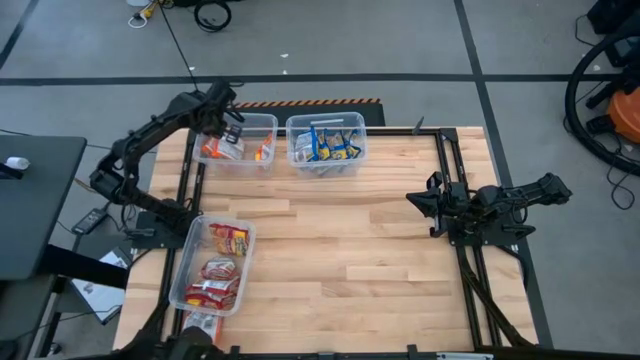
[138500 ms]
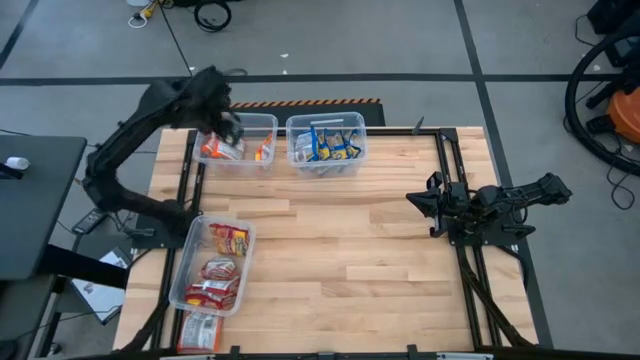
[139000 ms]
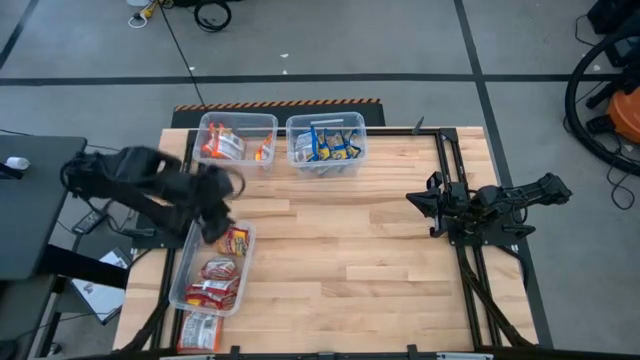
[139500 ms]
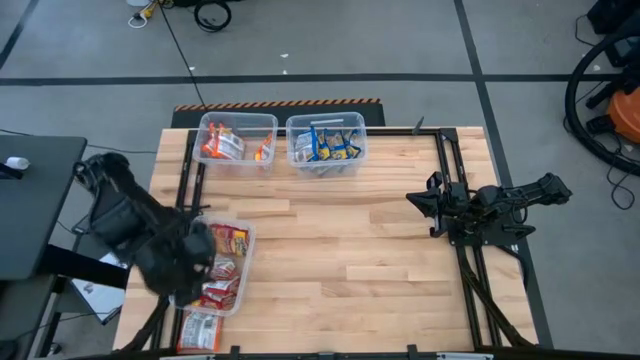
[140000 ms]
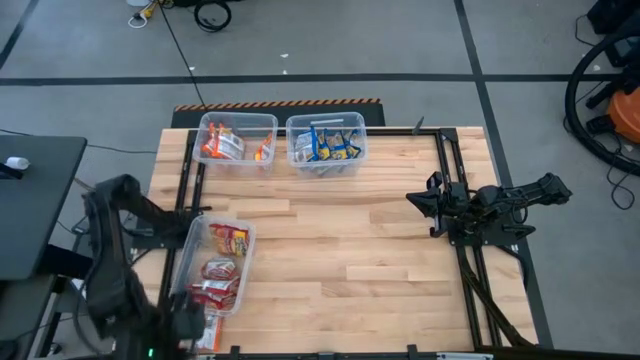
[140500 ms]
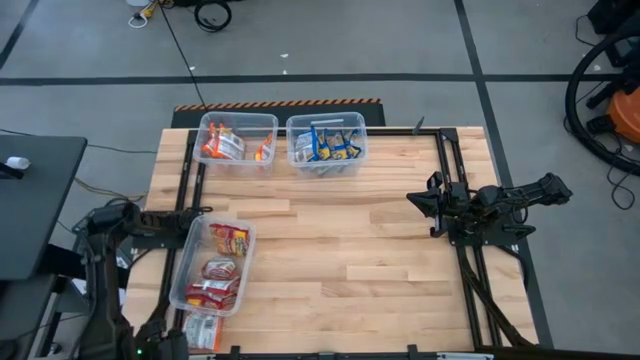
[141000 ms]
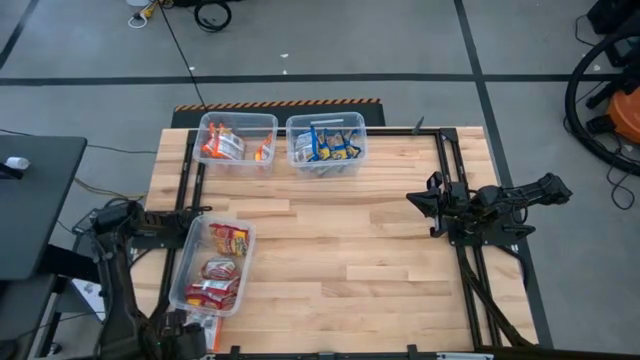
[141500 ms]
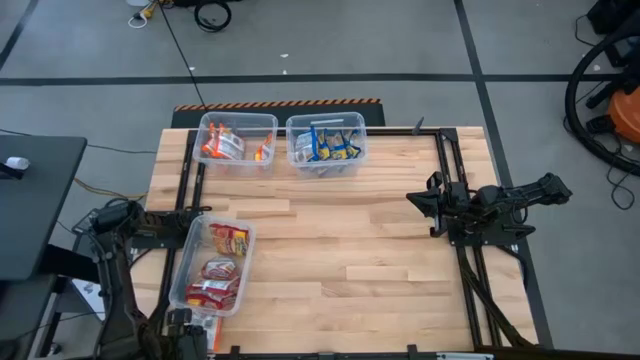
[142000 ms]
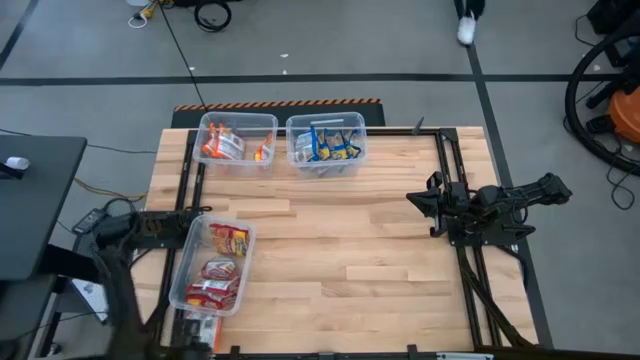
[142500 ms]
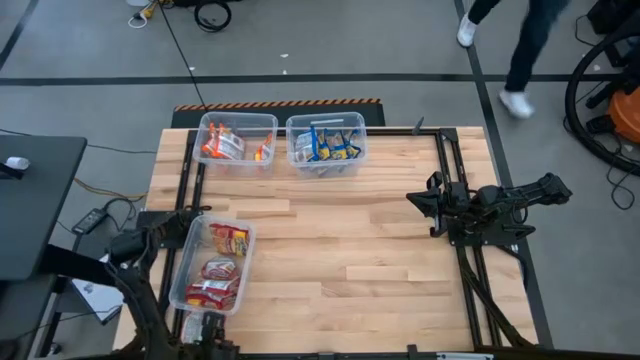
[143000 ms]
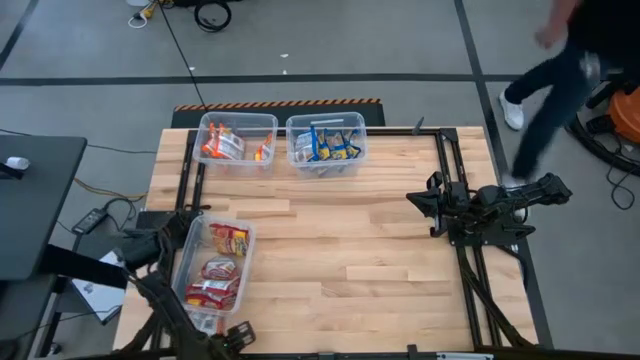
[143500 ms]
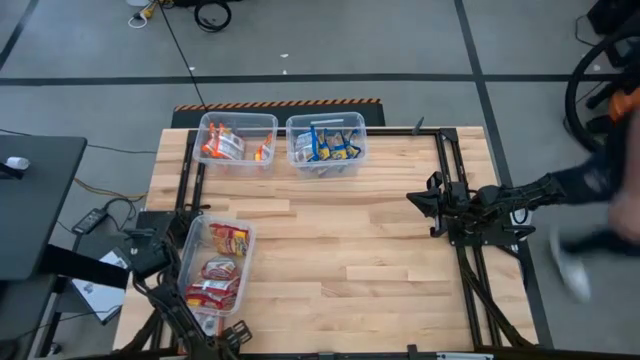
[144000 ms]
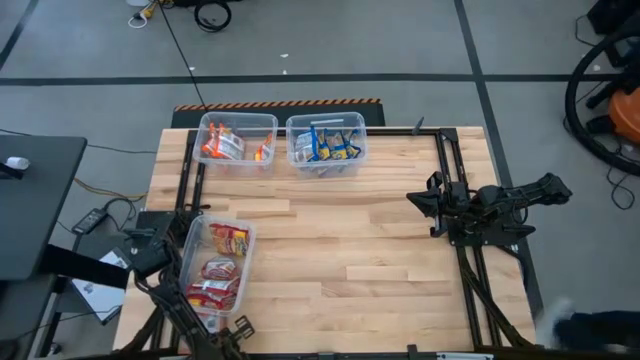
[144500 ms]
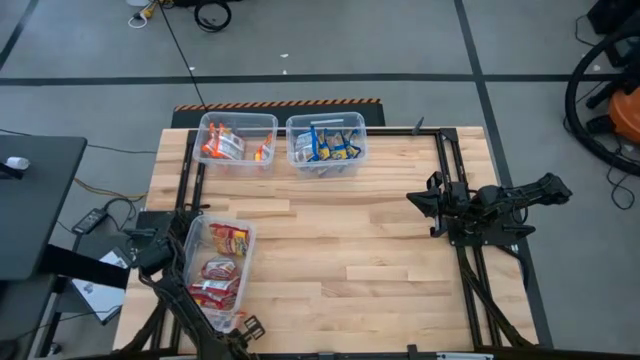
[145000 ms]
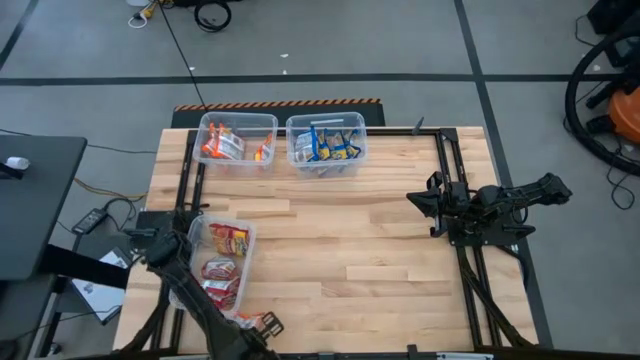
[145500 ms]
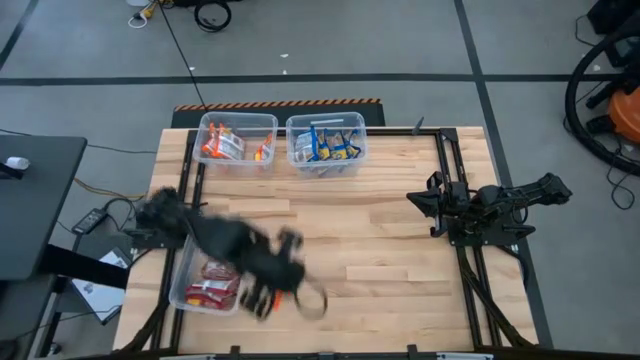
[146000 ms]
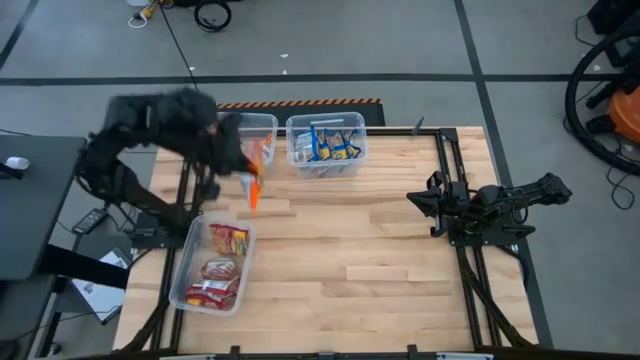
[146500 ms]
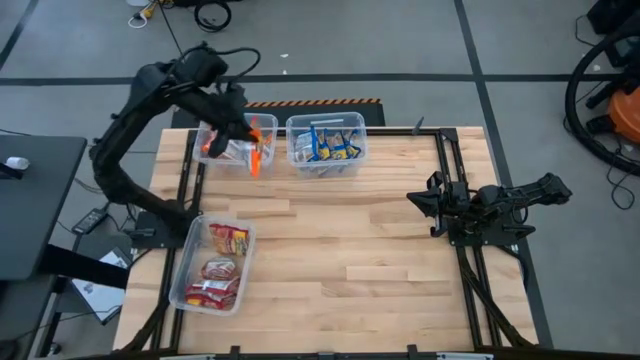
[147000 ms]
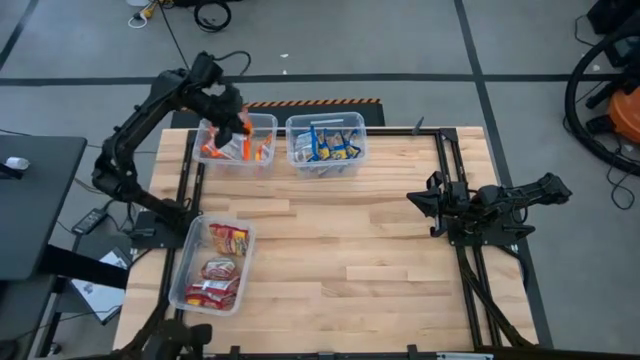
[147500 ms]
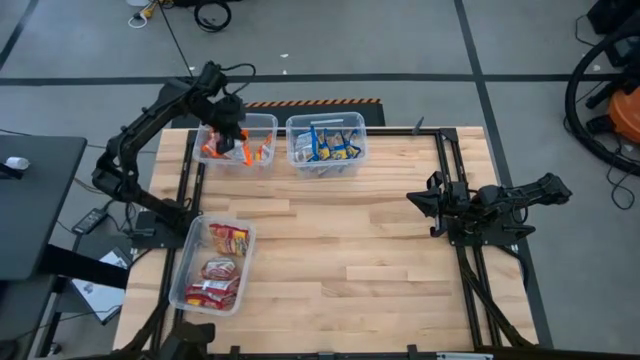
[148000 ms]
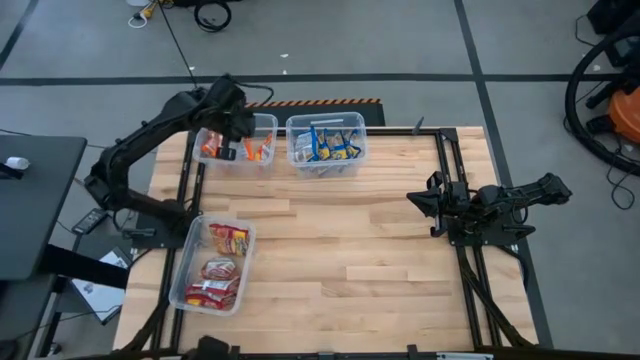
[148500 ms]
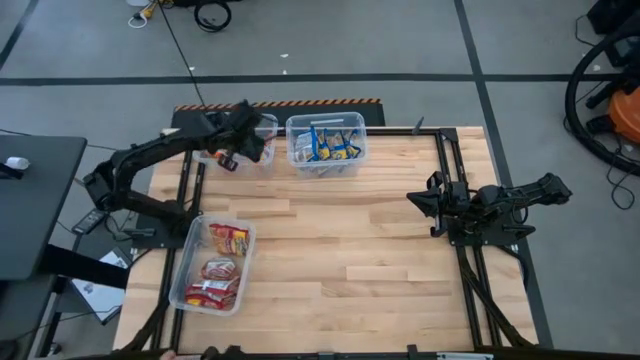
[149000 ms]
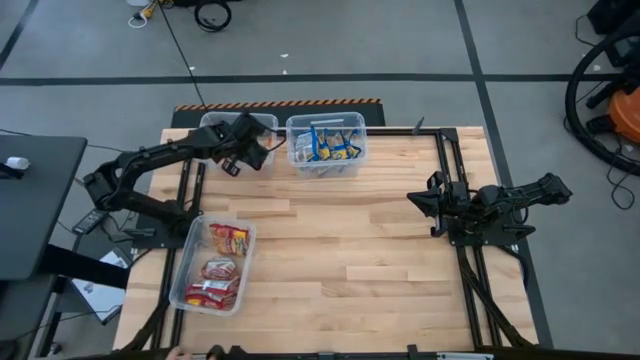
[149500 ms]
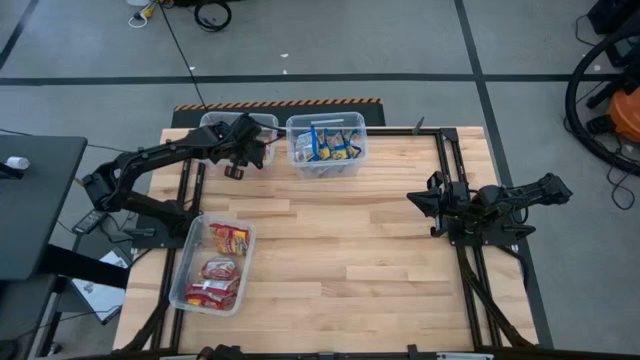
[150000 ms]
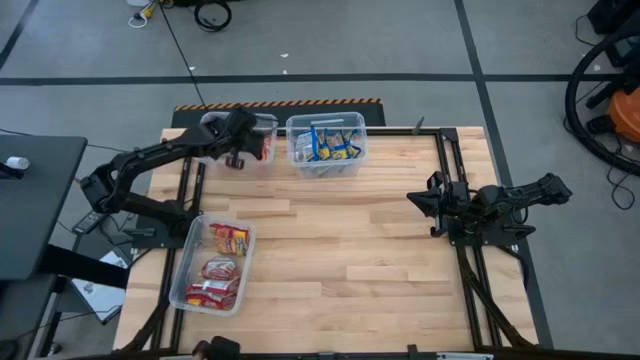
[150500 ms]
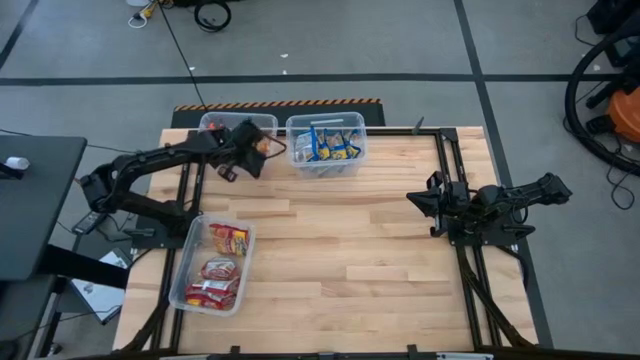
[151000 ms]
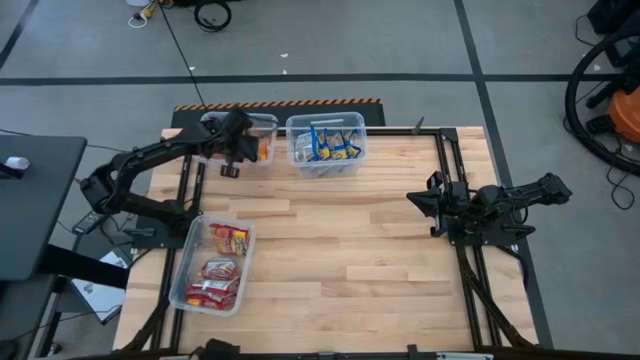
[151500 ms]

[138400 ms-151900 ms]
Task: Sort Maruchan noodles
Put the orange noodle pack into the top left transparent bin

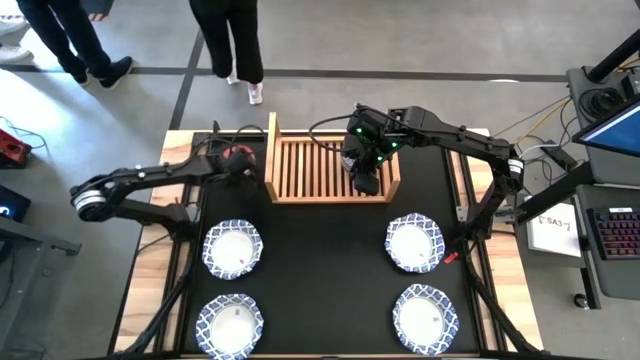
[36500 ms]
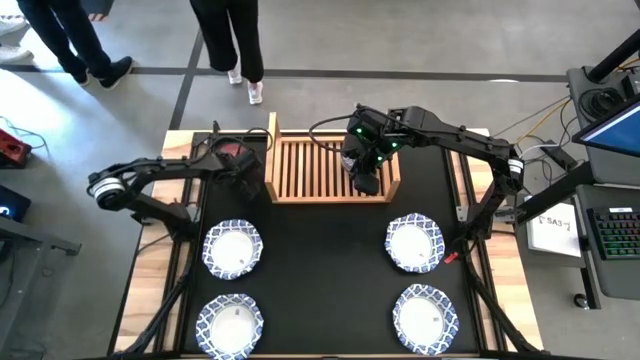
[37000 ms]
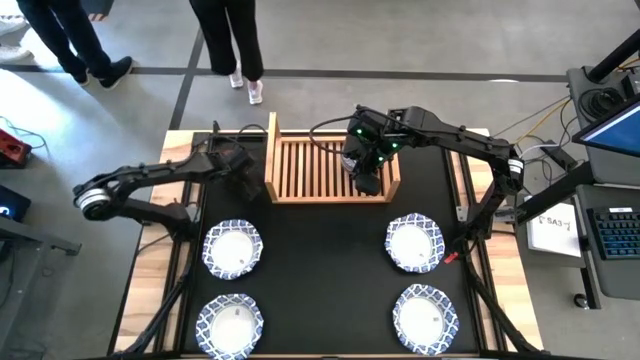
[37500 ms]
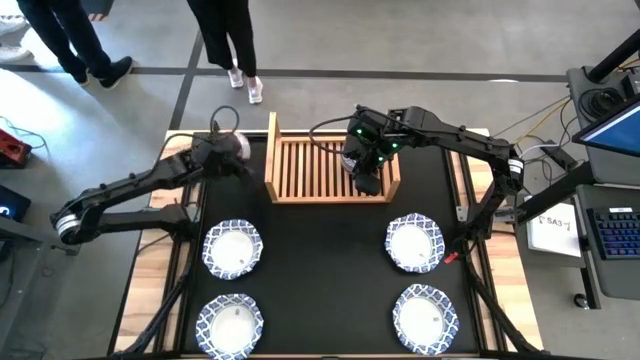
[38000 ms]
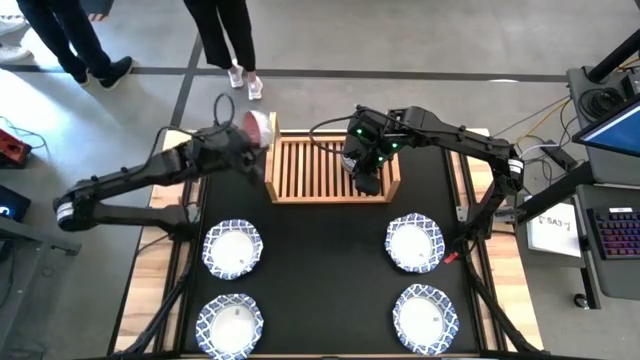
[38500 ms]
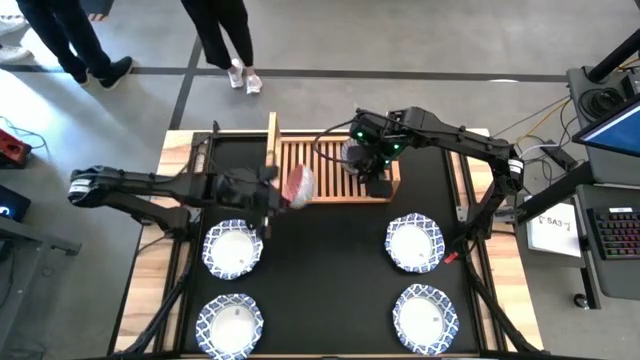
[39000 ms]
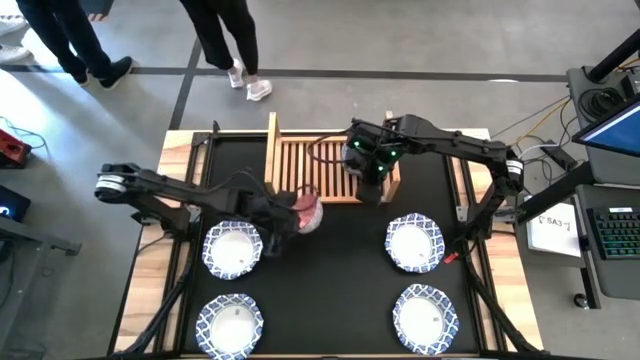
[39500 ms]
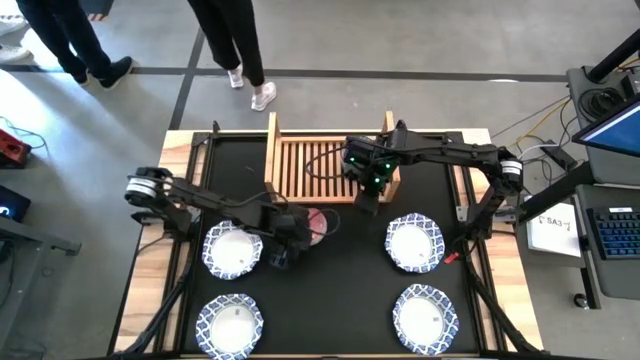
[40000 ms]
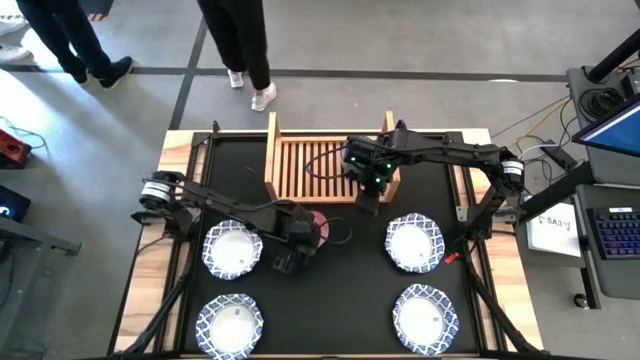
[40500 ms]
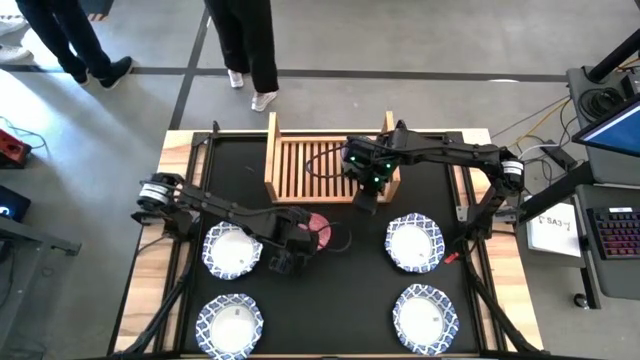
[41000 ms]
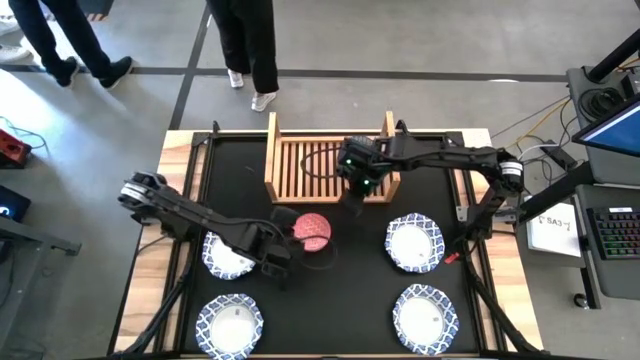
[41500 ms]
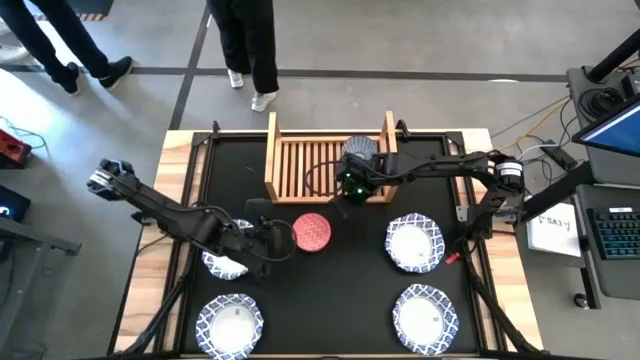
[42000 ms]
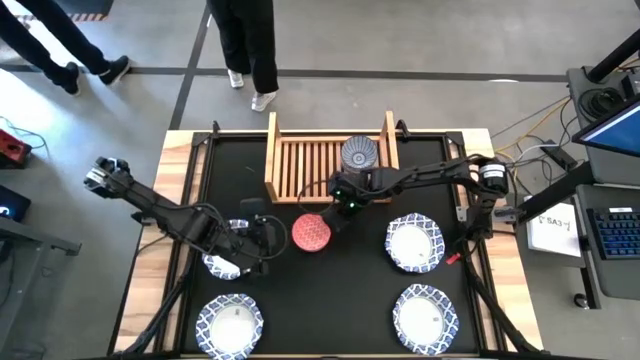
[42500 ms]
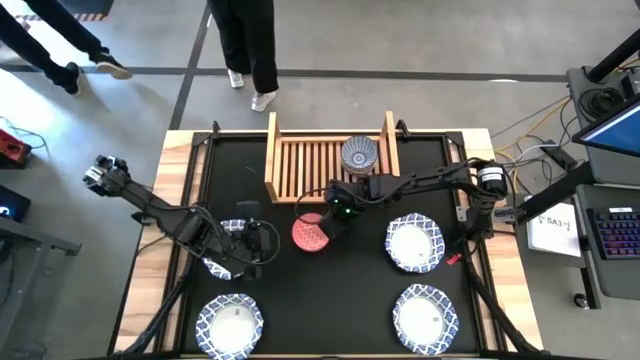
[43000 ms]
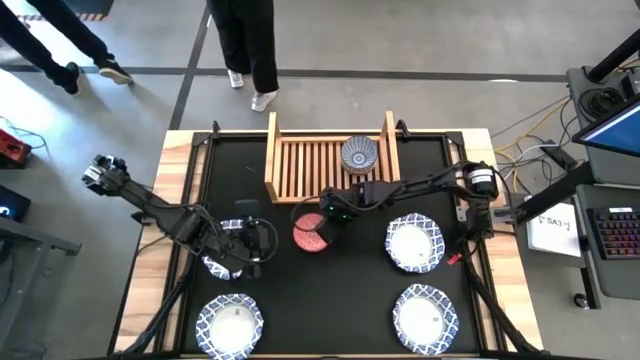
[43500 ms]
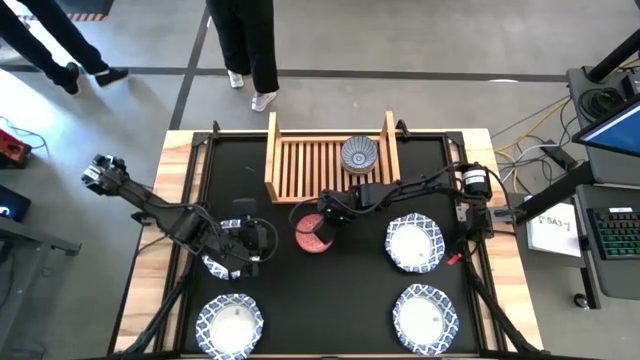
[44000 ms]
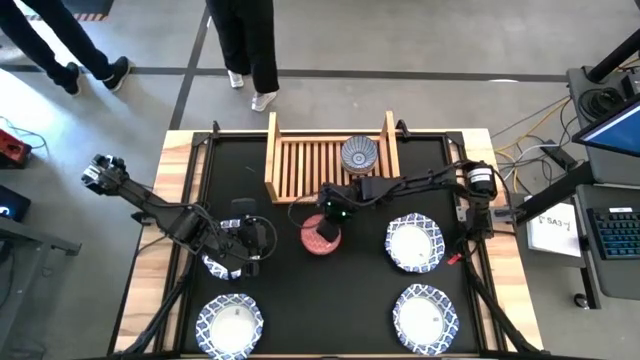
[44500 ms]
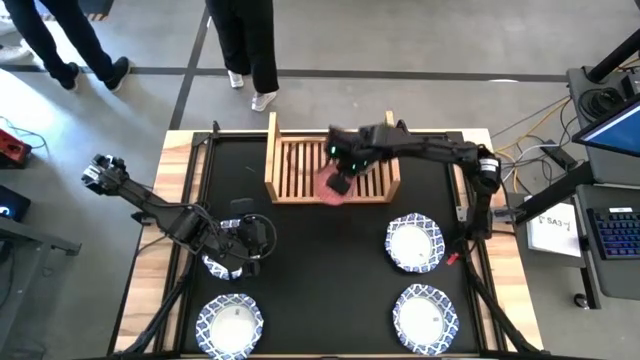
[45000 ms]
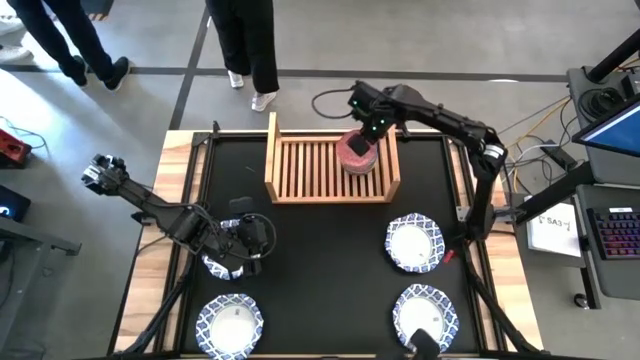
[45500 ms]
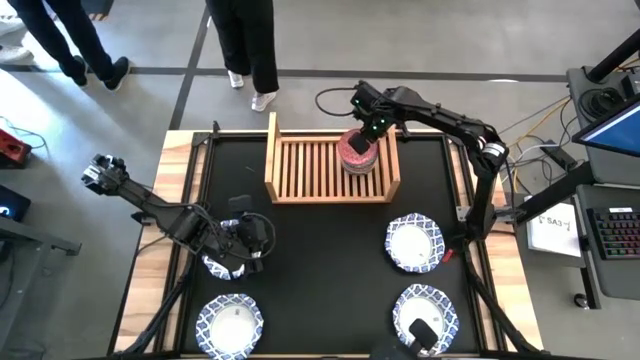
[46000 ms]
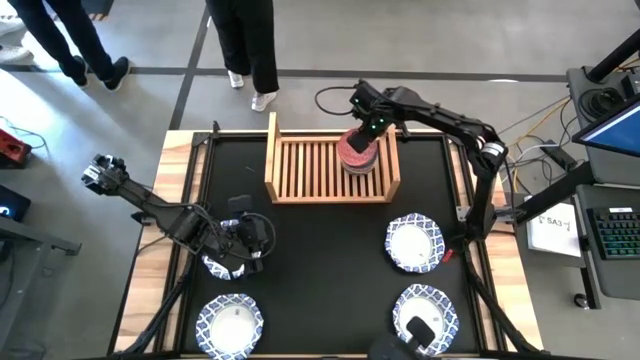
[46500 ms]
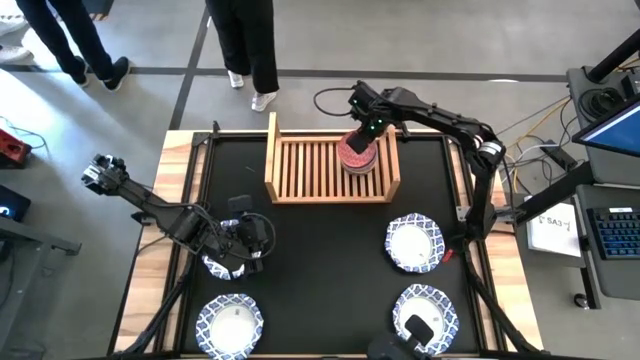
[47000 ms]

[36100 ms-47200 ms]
Task: Place and stack bowls onto a shelf
Stack the red patterned bowl on top of the light blue patterned bowl on the shelf
